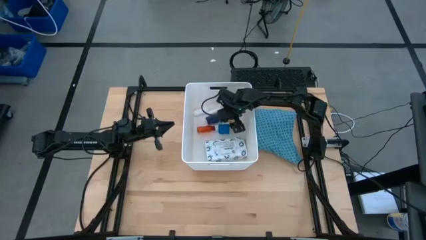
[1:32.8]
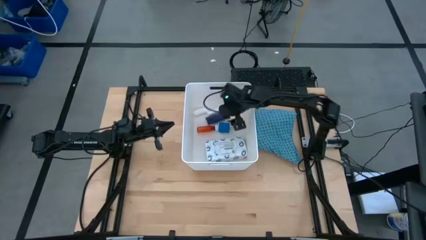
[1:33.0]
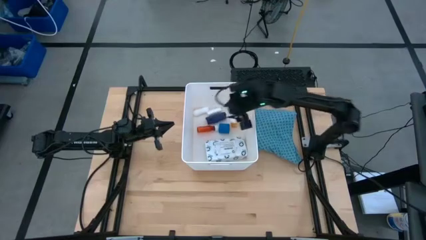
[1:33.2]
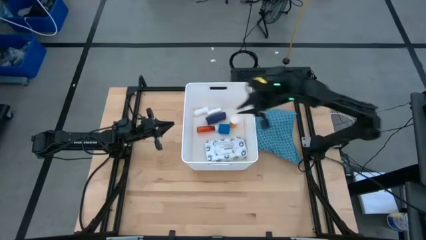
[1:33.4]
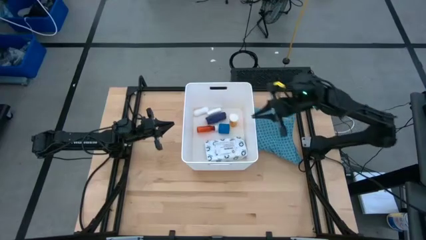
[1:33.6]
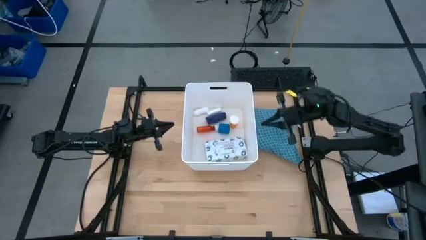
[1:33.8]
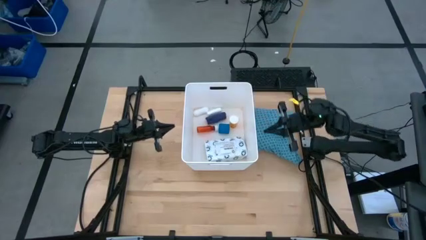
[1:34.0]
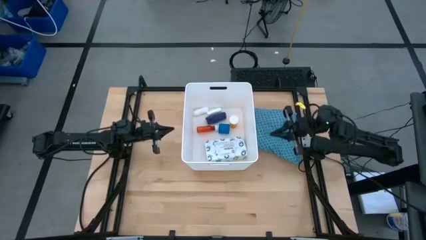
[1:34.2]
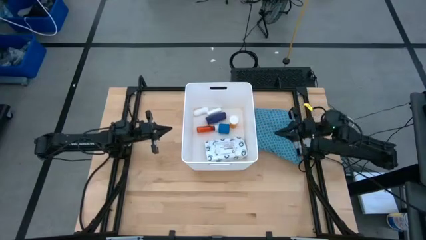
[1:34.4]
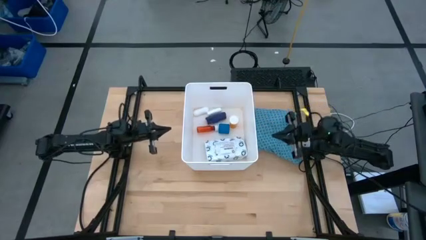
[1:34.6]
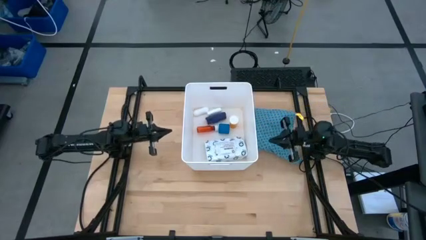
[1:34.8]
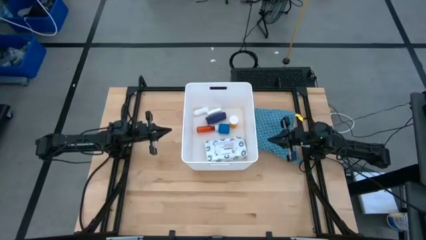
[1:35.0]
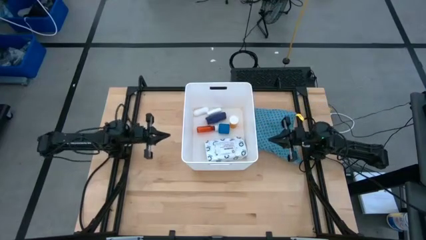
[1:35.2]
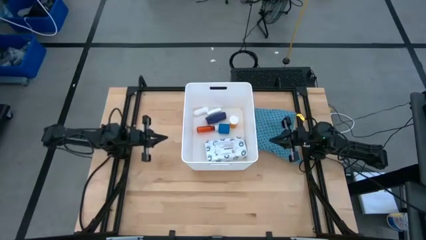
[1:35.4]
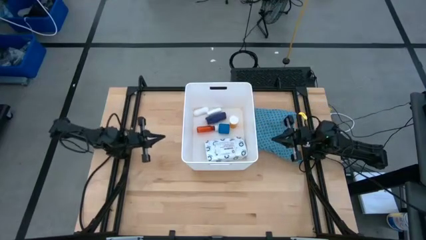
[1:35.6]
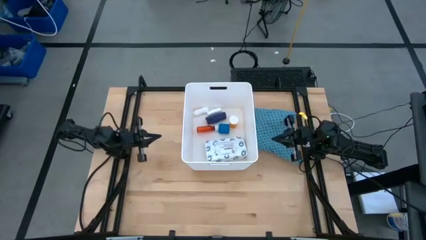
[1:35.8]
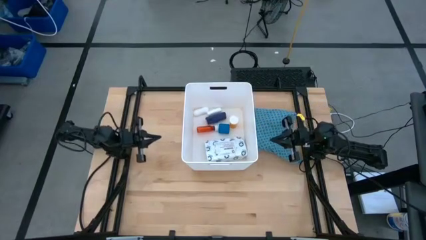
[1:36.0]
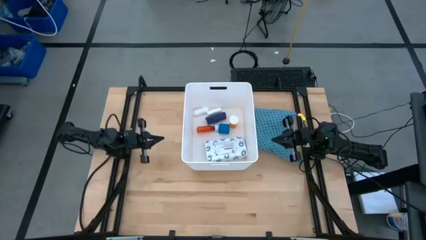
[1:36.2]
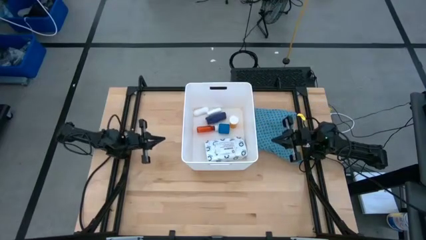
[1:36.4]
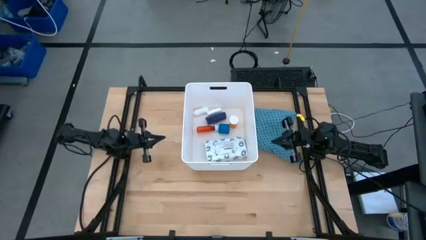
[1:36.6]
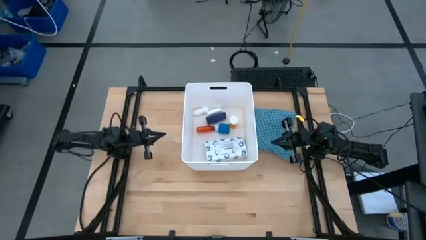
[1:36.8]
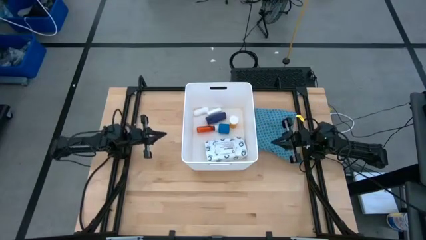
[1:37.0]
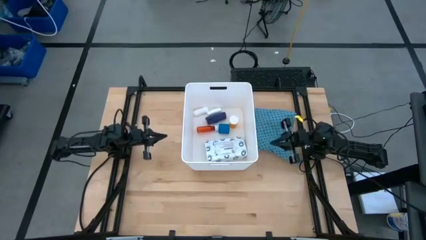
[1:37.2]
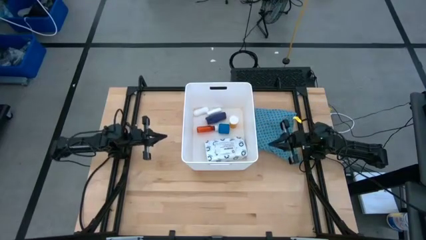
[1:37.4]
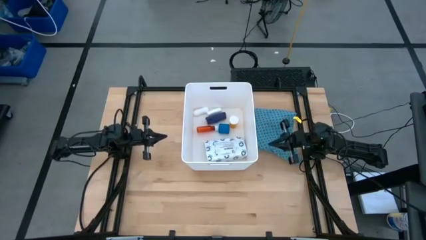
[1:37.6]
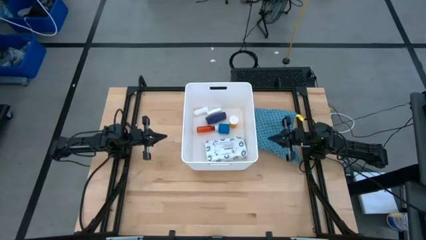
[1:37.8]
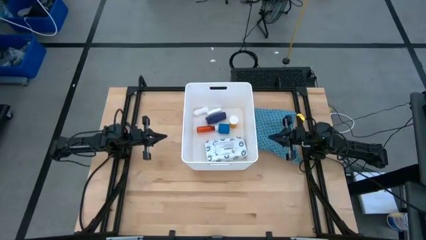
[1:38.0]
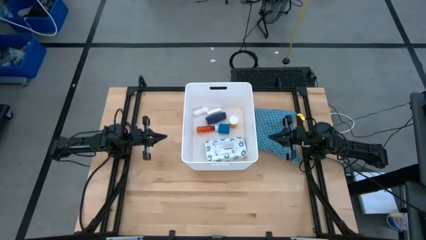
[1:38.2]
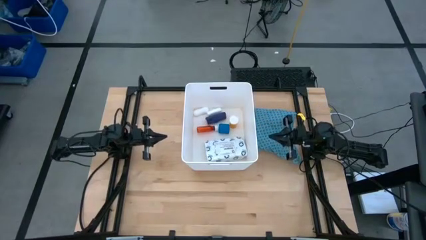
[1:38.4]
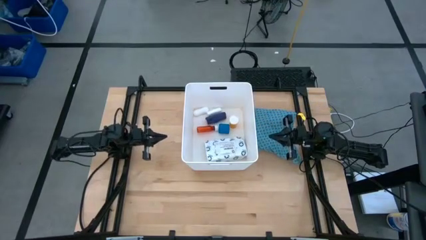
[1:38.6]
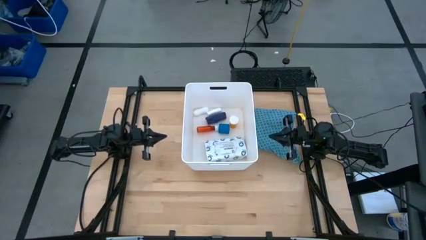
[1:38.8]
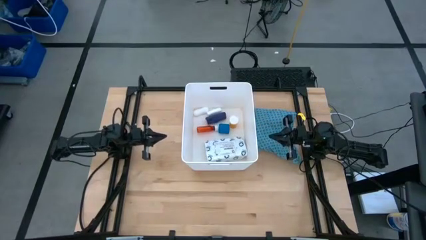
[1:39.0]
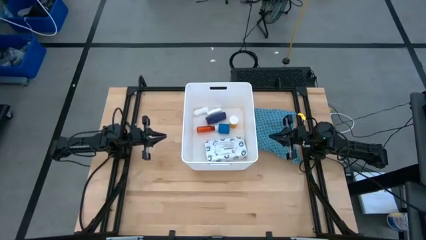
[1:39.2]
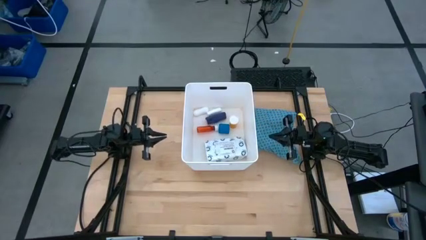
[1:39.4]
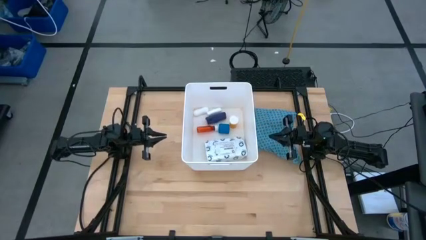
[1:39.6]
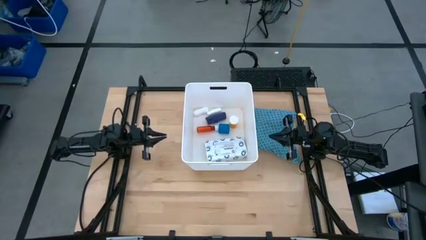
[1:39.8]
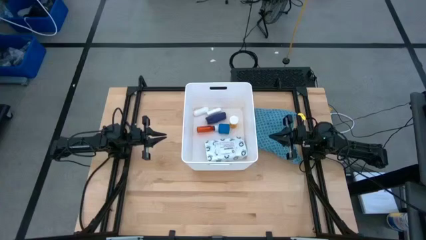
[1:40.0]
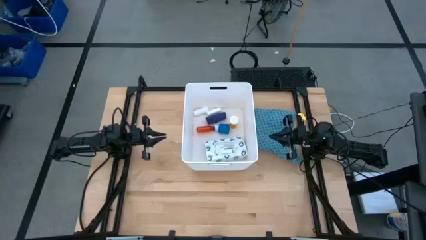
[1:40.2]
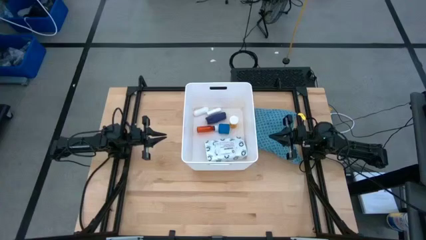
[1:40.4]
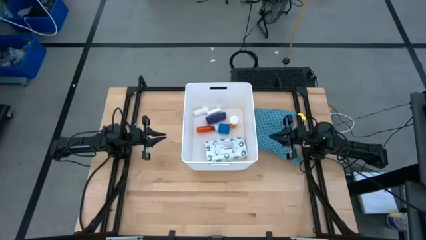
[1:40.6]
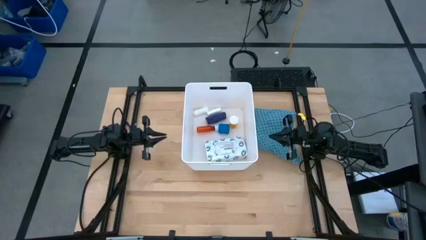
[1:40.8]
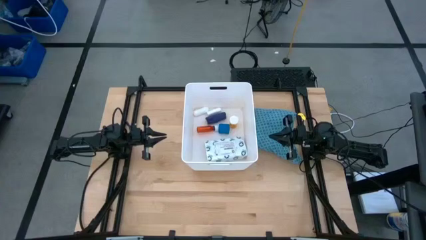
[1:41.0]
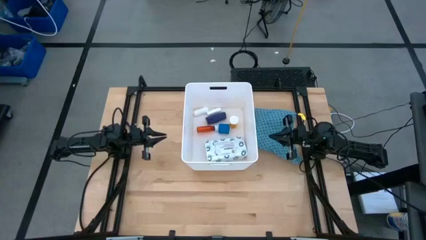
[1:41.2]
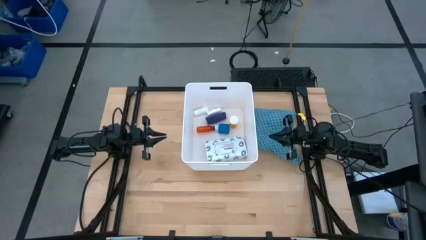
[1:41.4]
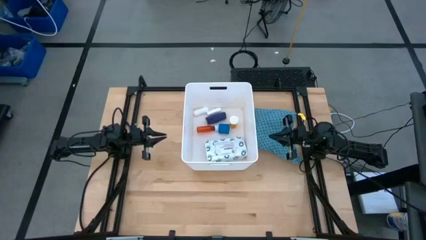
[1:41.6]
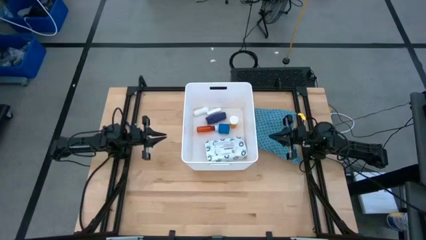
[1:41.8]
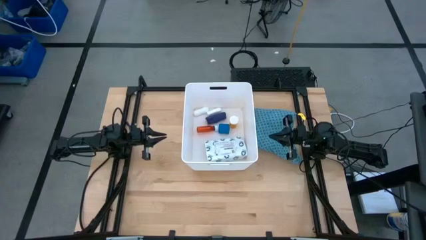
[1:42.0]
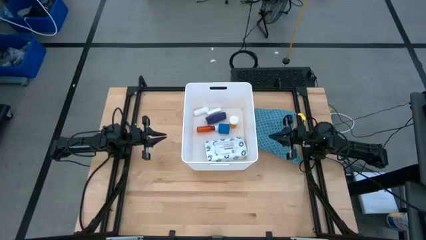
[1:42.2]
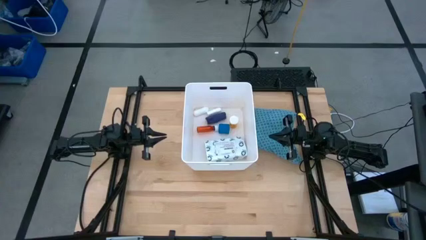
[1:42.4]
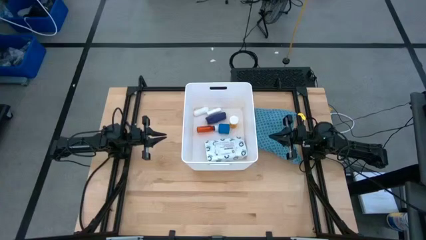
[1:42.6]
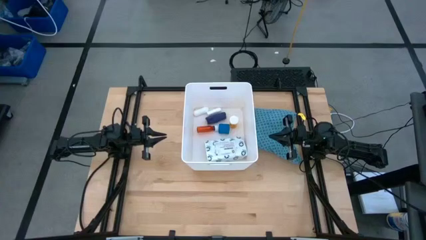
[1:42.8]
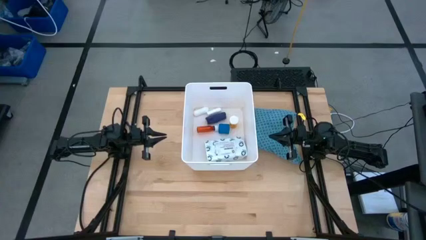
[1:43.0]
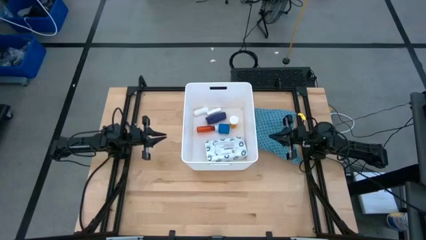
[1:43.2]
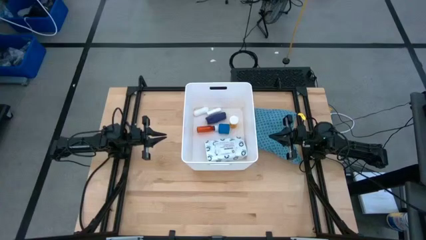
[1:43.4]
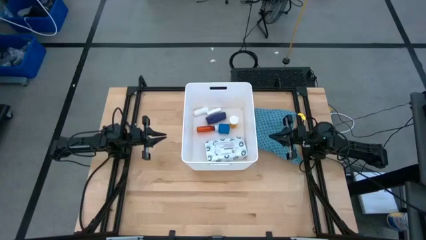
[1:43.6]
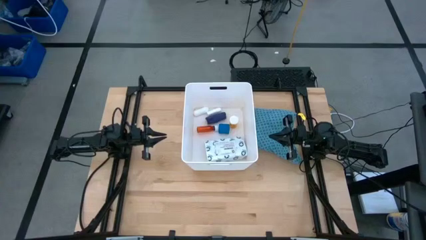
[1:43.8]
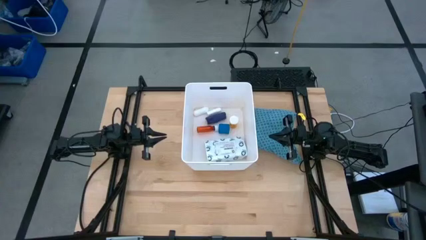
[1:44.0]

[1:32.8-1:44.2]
Task: Pick & place medical supplies in basket/bin
Return to Home Position

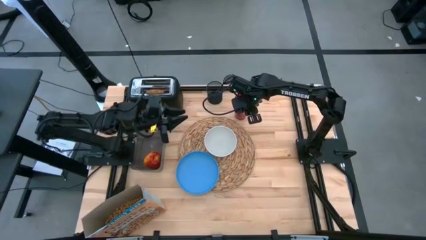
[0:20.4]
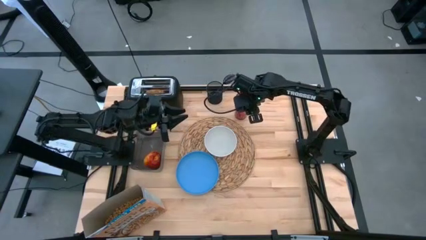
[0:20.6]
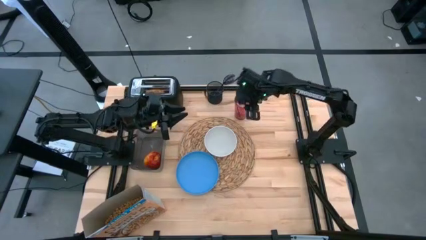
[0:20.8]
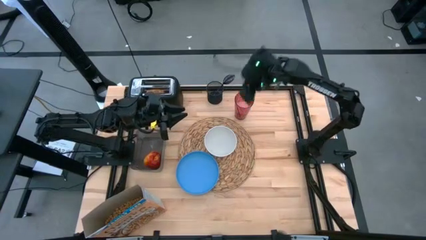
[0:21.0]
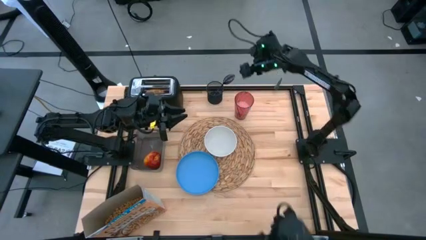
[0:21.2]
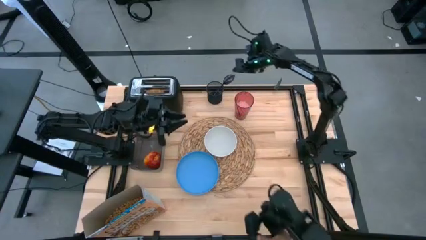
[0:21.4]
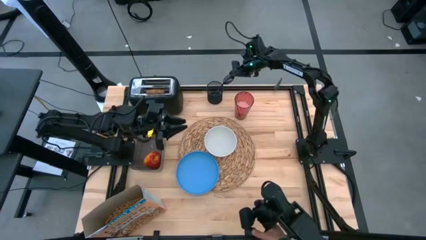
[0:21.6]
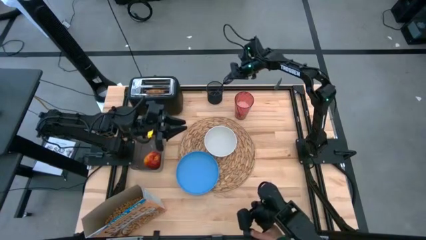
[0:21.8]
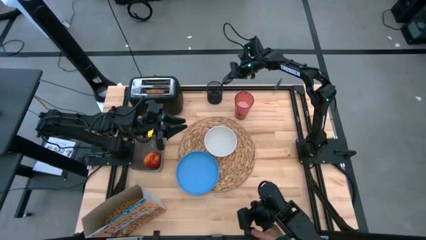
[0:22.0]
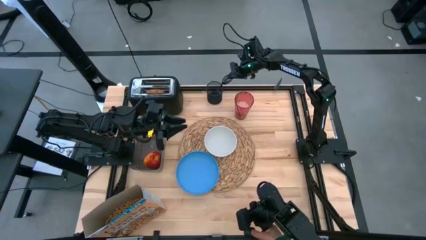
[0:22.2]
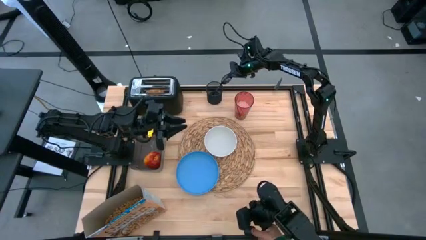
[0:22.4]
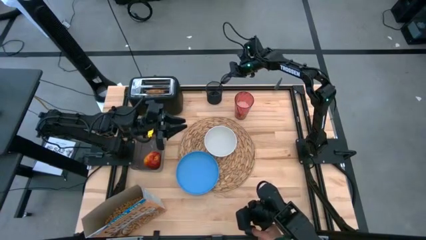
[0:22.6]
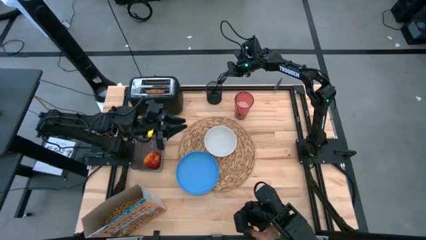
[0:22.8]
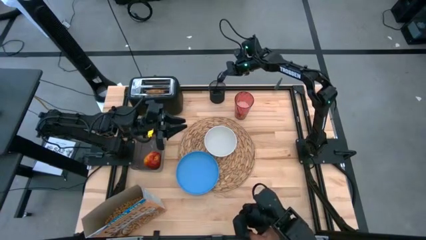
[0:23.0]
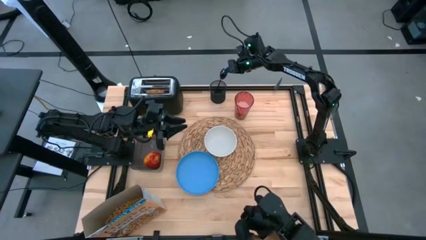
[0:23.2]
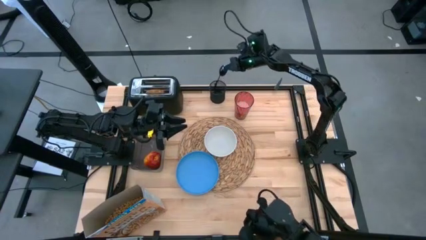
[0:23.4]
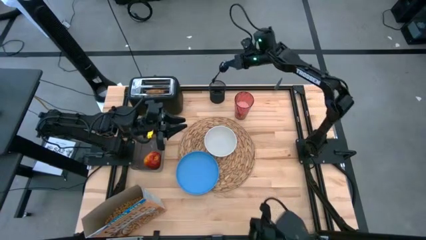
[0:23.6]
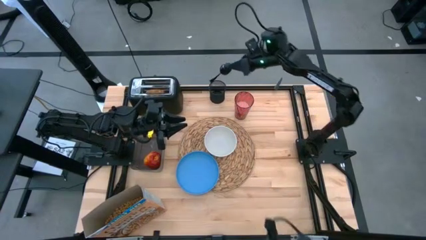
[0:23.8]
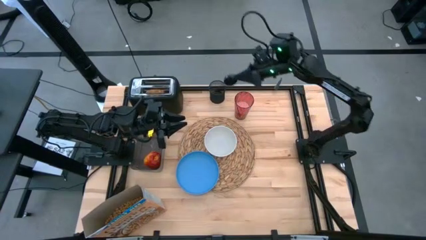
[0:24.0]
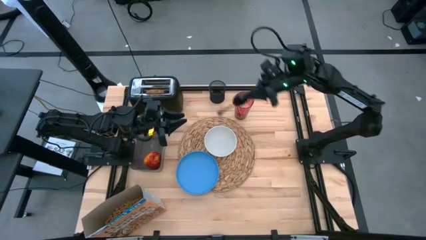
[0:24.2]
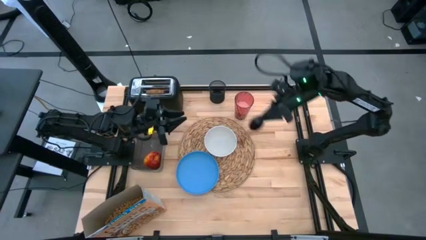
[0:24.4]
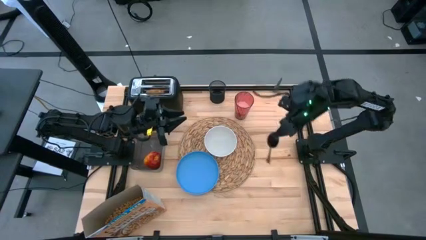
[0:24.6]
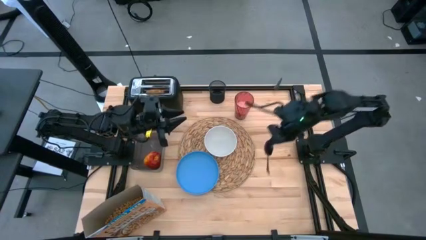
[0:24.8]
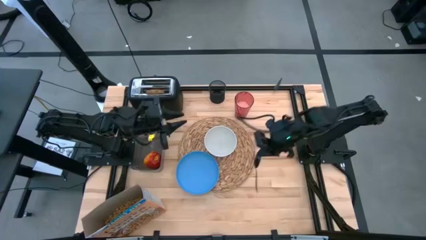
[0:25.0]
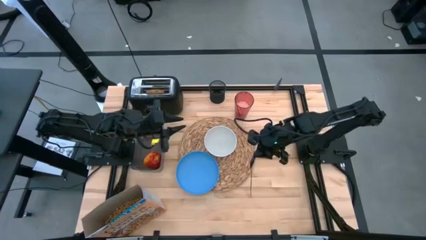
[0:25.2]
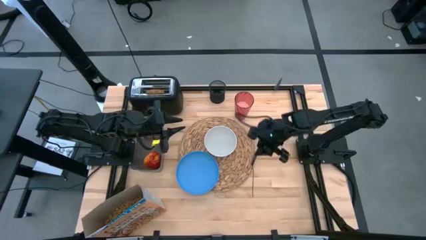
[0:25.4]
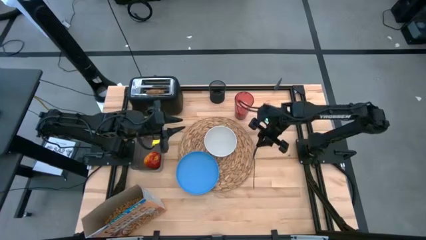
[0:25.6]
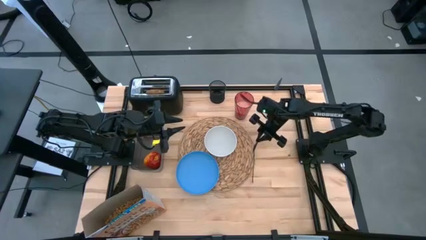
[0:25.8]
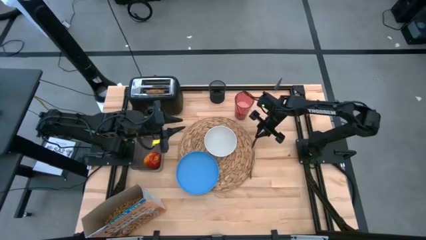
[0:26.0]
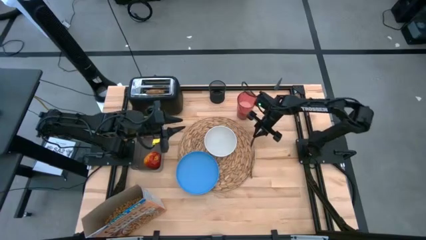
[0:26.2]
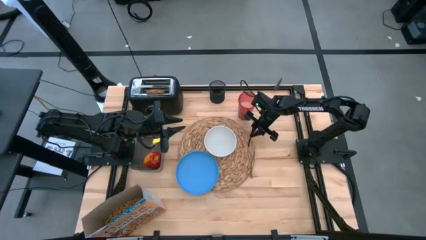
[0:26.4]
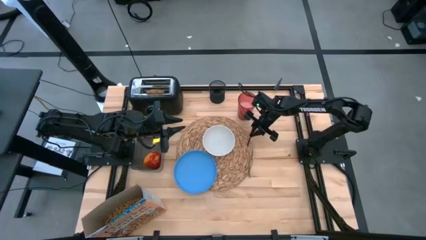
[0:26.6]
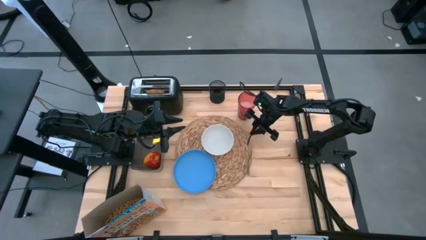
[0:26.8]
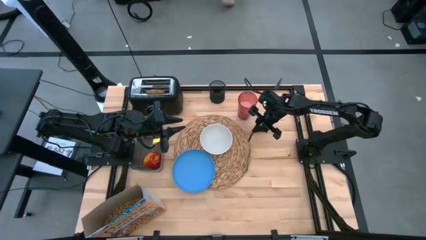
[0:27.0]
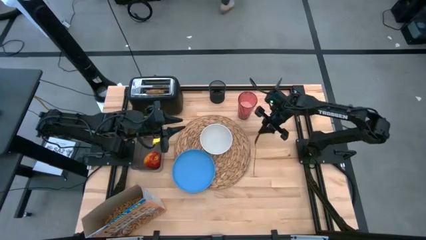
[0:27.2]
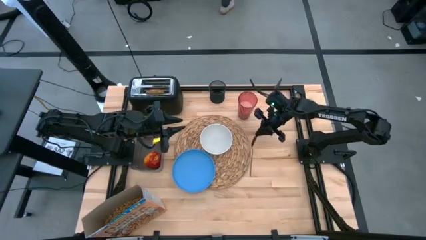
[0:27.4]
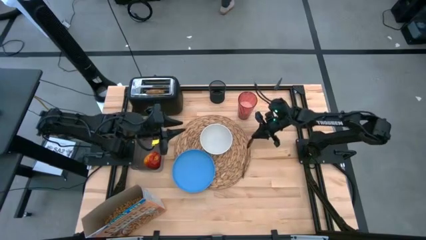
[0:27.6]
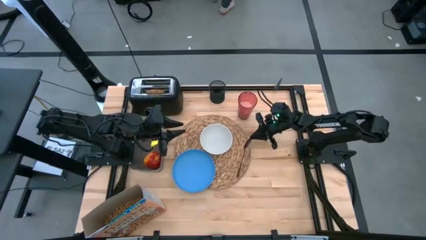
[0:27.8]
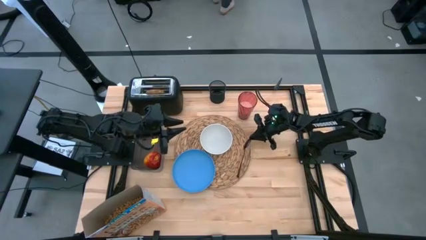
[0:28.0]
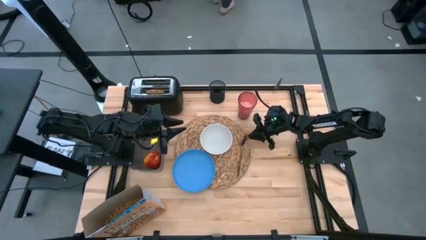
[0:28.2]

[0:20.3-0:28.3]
Task: Arrange a breakfast setting
Put the black spoon on the brown placemat to the right of the white bowl
